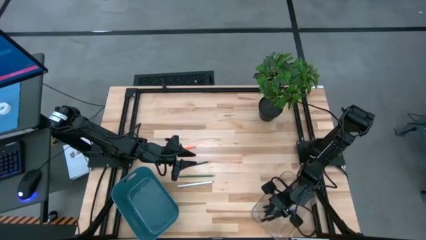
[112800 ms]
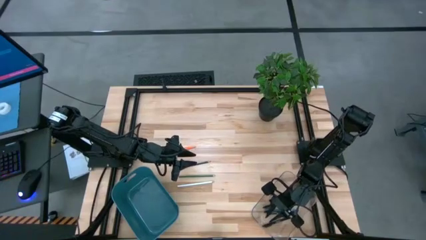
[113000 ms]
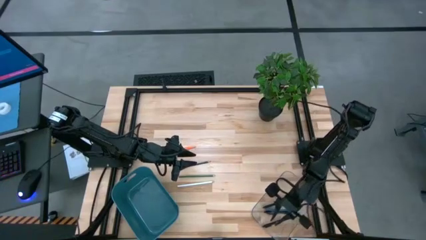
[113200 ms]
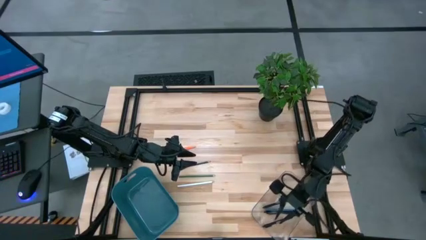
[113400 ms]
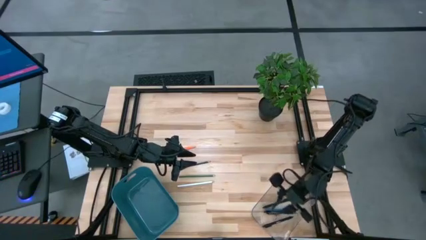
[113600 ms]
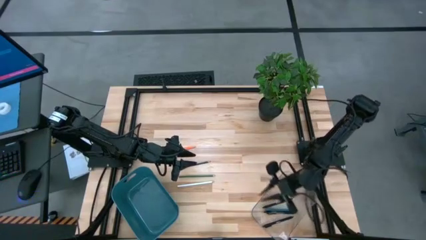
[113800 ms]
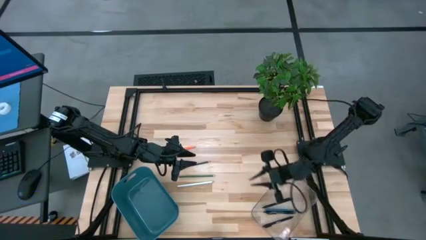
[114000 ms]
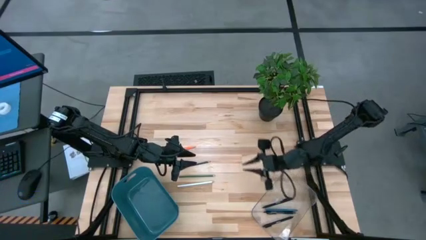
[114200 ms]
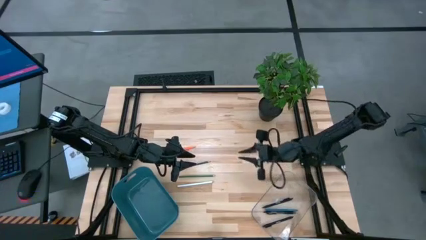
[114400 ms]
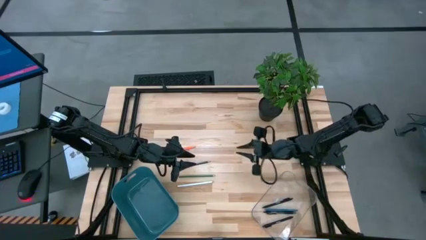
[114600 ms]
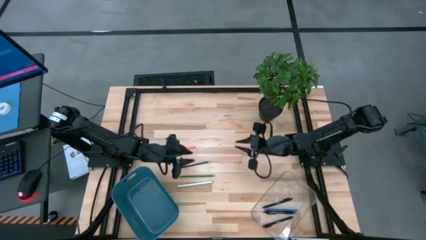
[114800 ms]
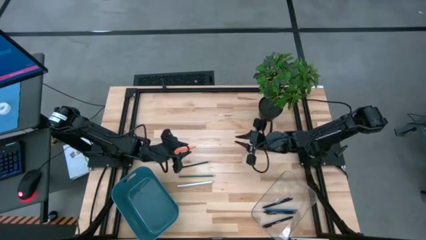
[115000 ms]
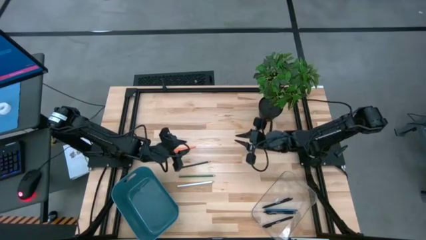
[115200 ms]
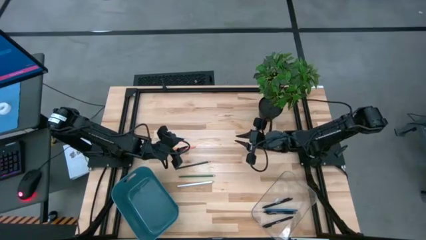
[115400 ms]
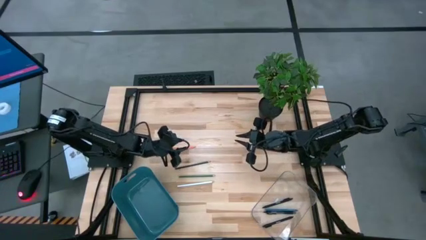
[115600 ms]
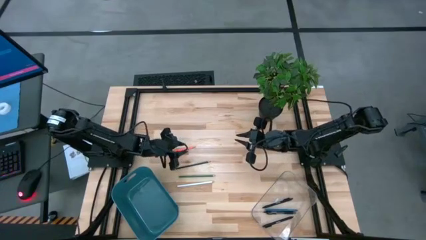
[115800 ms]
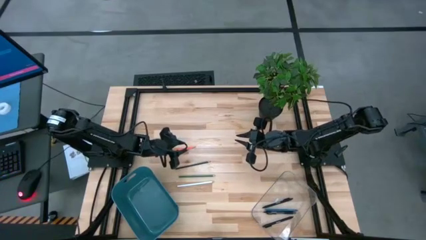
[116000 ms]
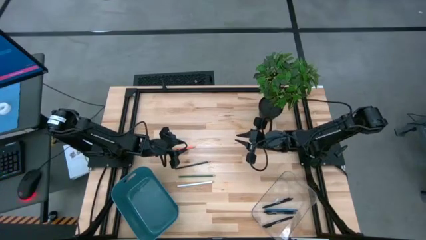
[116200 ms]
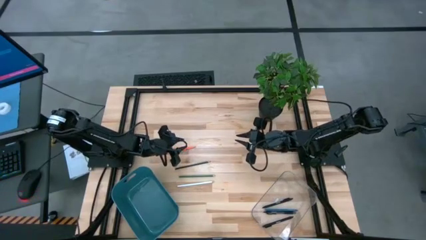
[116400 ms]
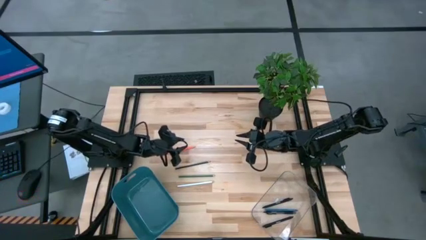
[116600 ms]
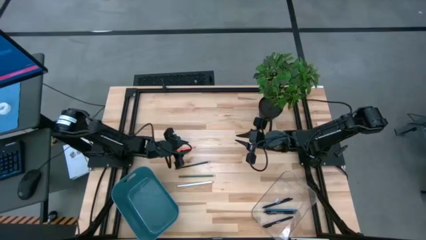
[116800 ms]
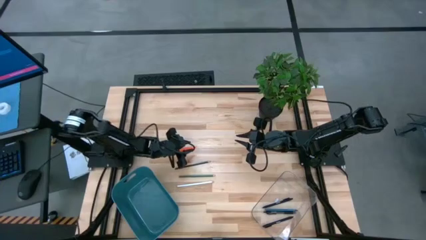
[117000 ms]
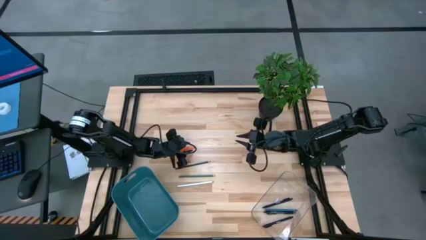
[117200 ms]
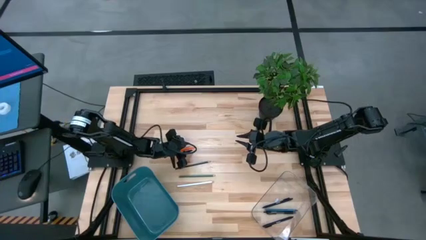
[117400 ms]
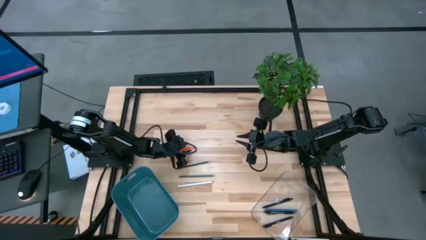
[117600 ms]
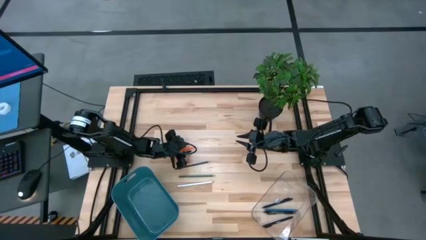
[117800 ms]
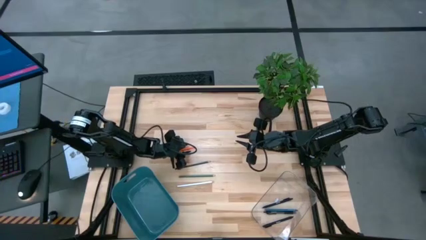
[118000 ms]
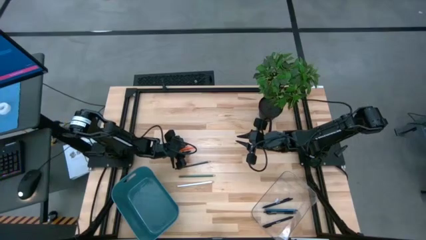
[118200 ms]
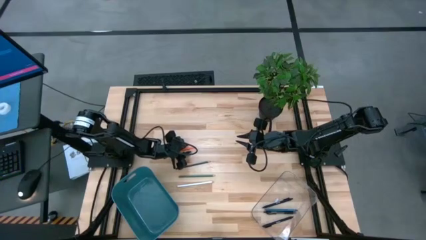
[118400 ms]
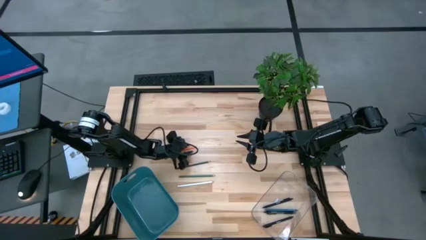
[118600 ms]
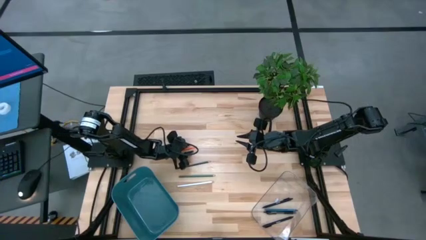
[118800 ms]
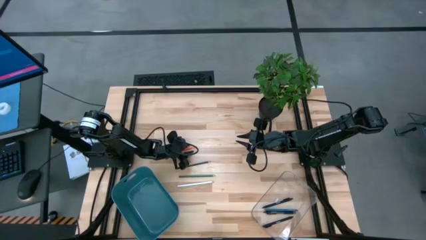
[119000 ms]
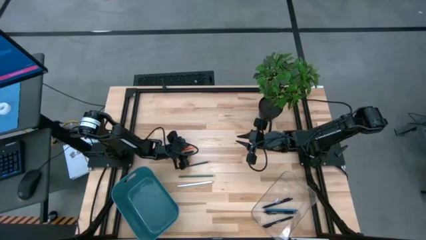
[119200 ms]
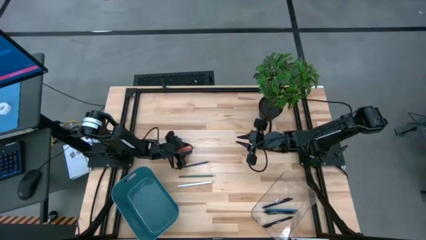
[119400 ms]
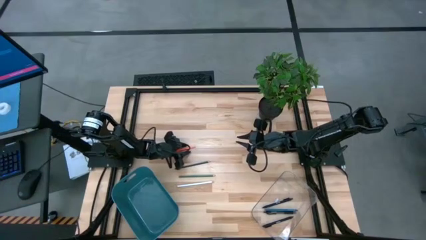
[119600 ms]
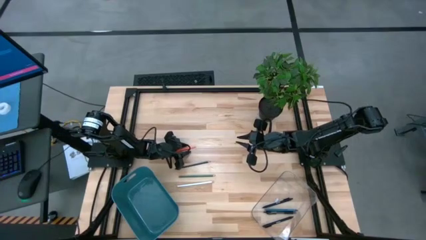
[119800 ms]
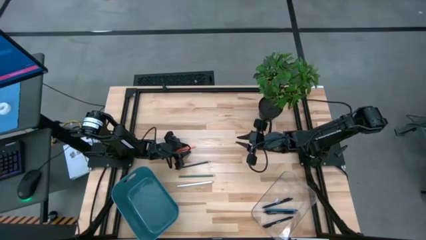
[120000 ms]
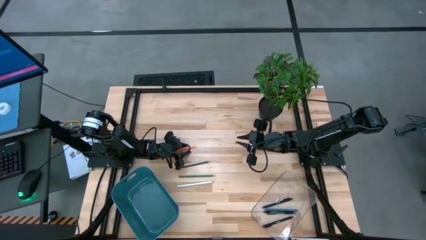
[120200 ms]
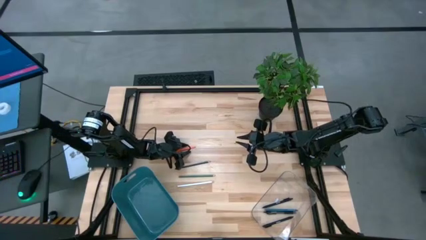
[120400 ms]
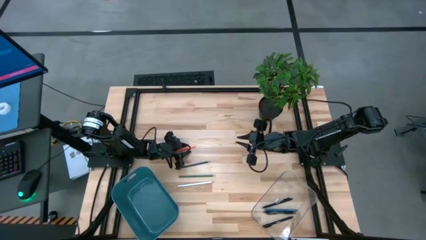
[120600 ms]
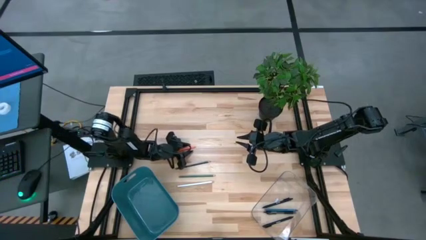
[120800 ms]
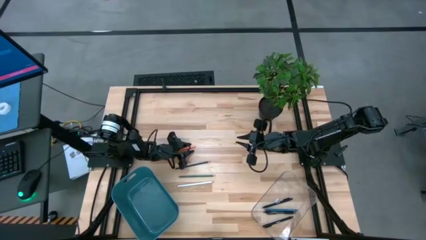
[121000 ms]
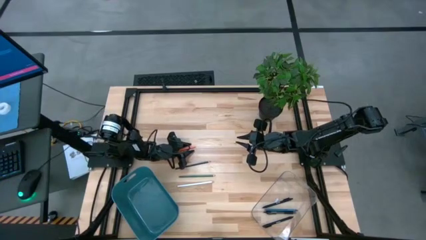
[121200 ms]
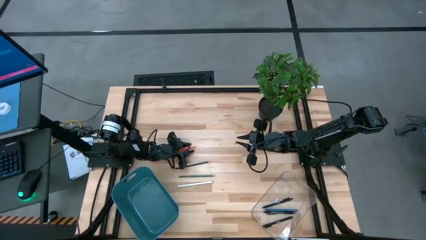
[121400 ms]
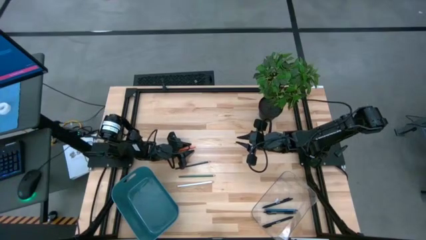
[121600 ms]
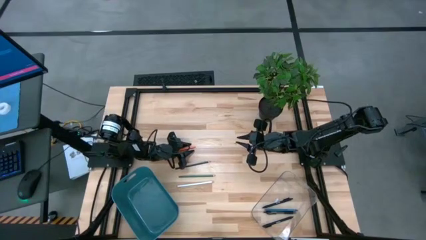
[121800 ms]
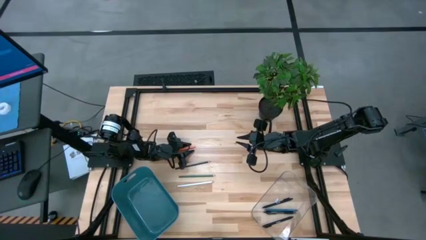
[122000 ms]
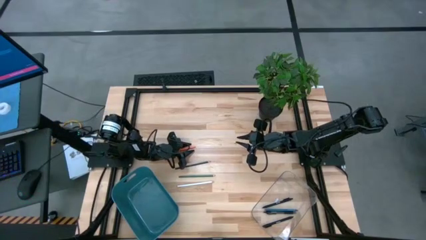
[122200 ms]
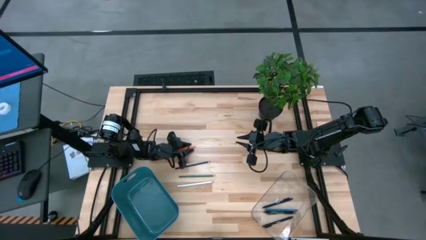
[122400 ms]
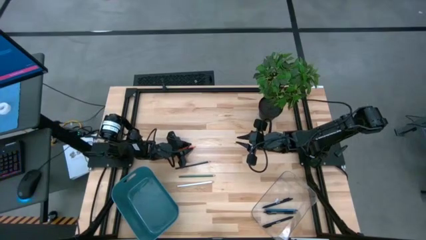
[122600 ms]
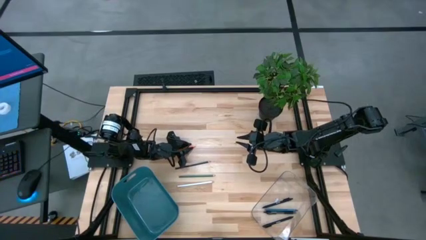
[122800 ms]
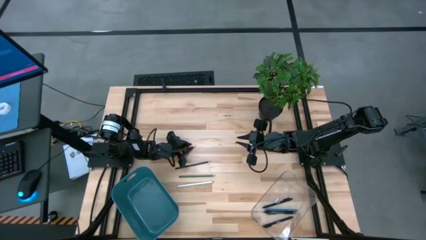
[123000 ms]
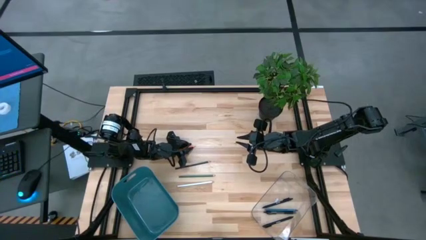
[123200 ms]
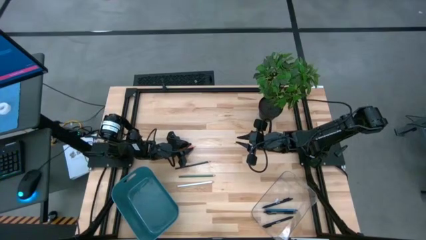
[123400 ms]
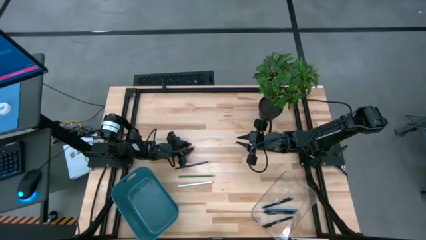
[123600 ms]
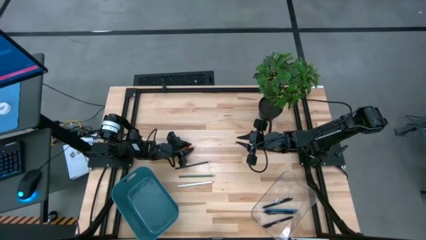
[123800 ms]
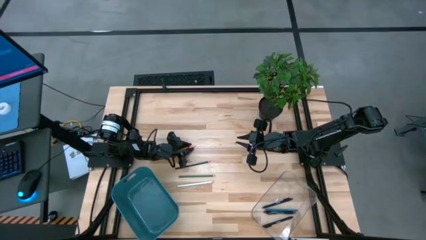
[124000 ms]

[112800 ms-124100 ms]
Task: Sort pens & pencils
Put the orange pencil in the blue bin
